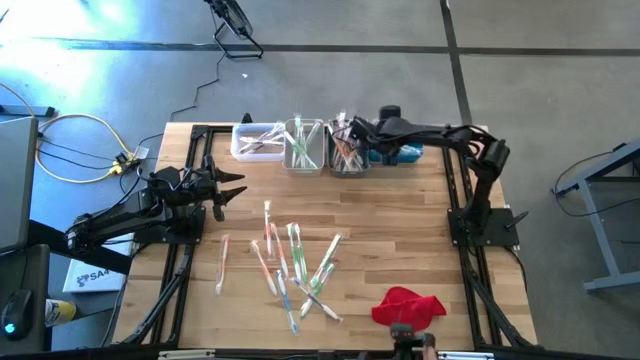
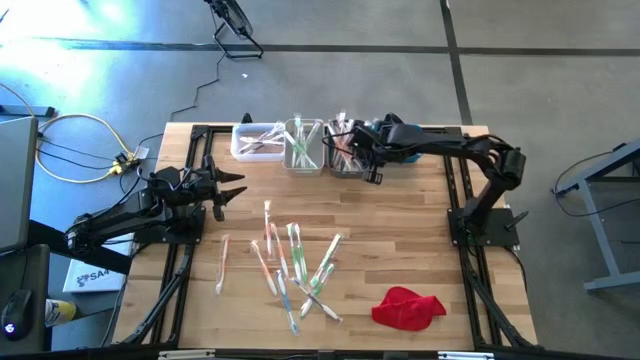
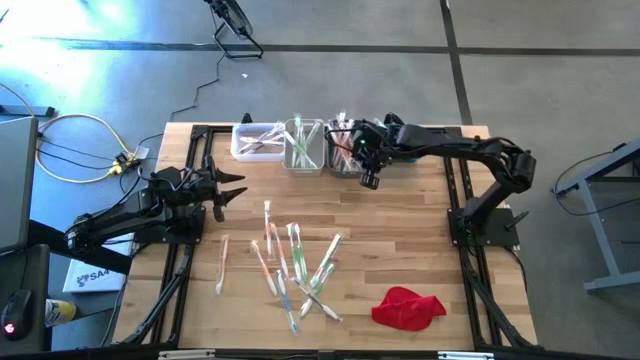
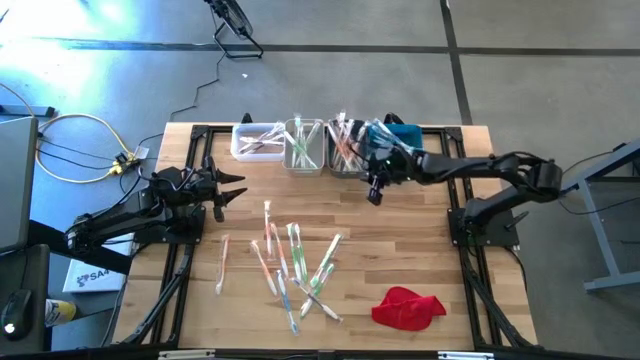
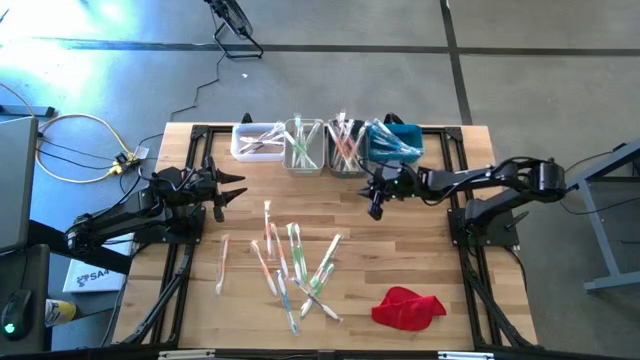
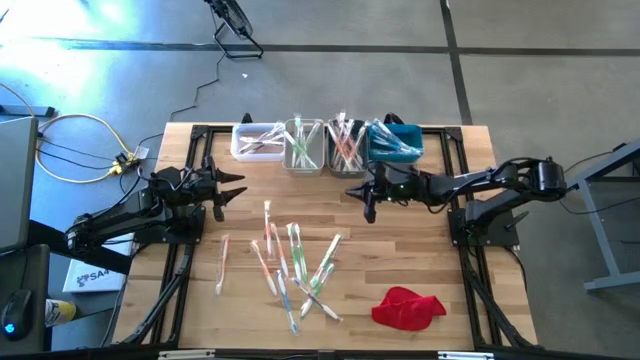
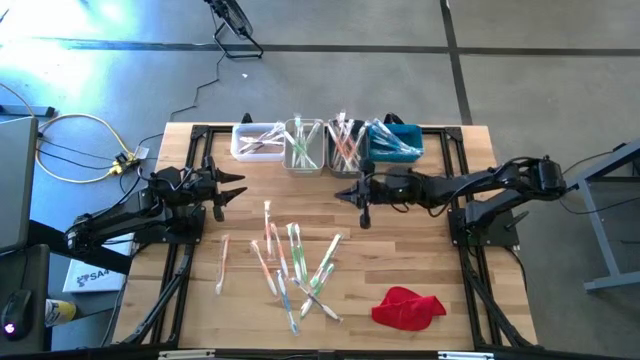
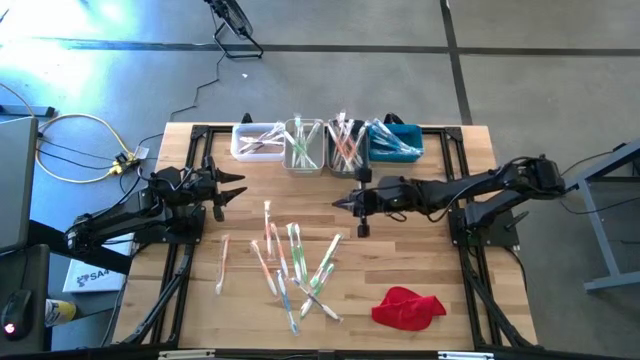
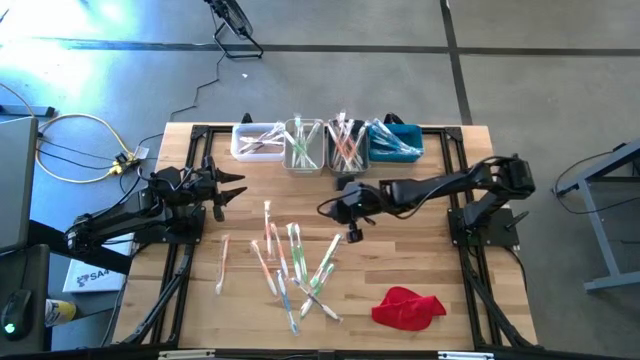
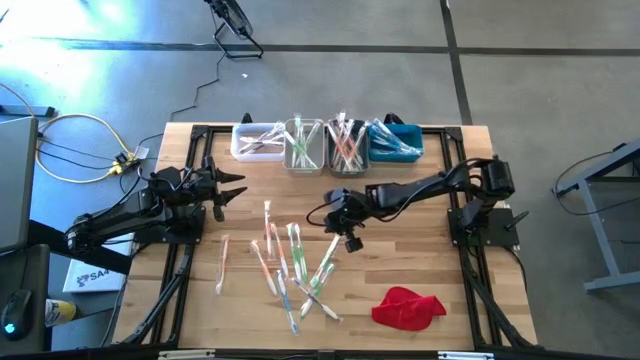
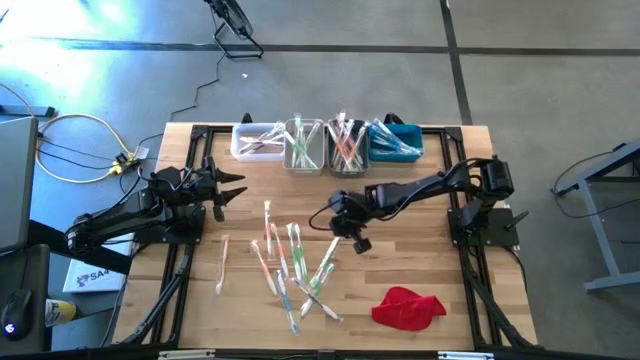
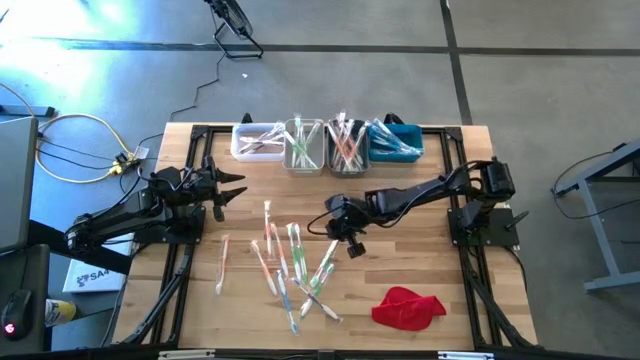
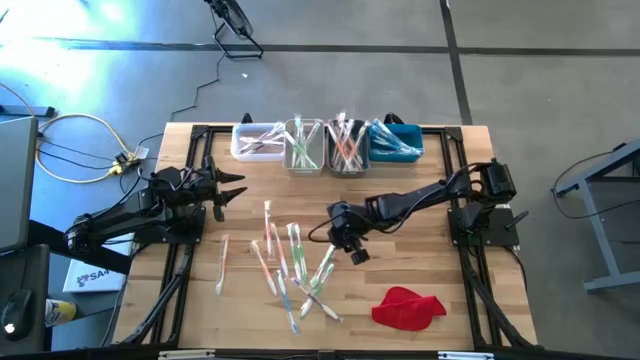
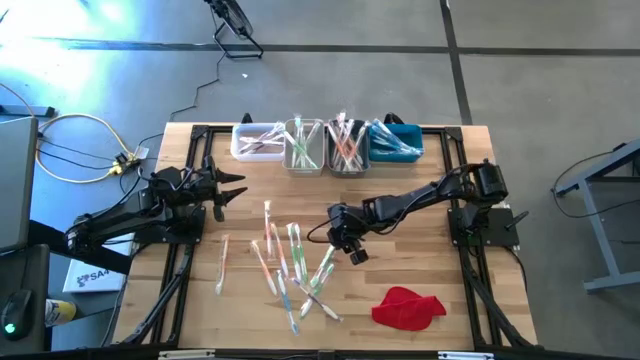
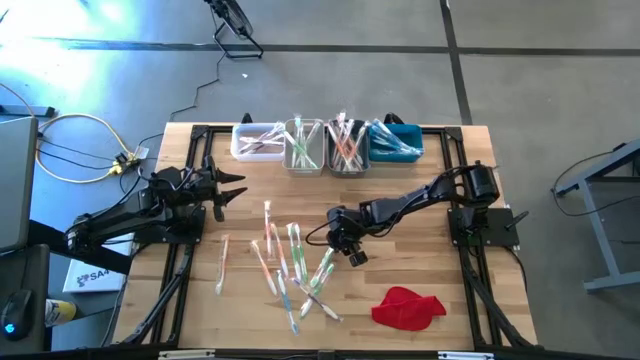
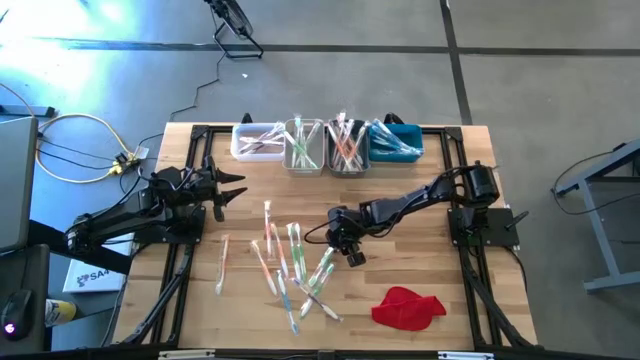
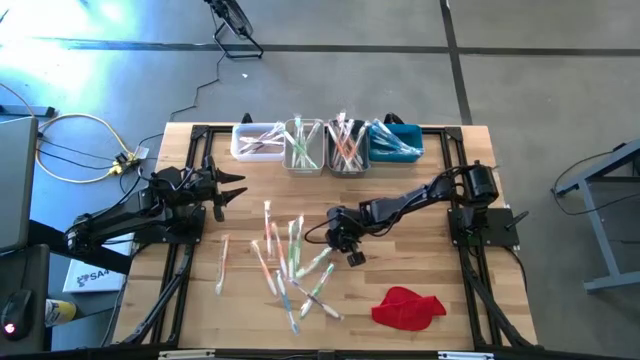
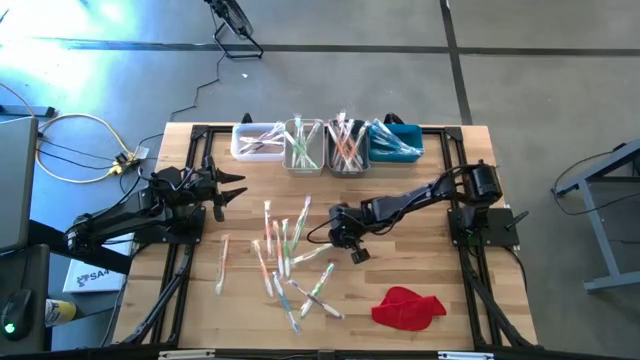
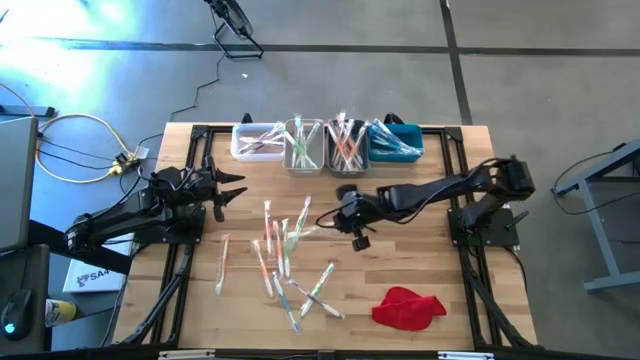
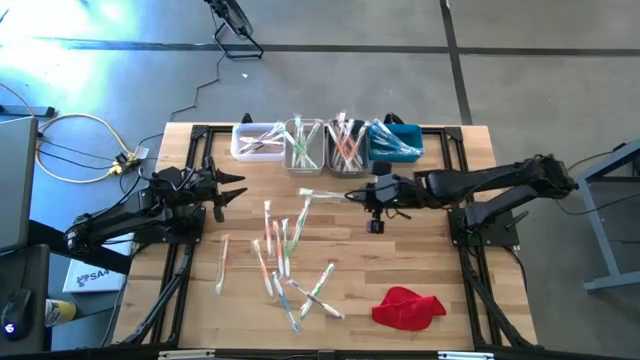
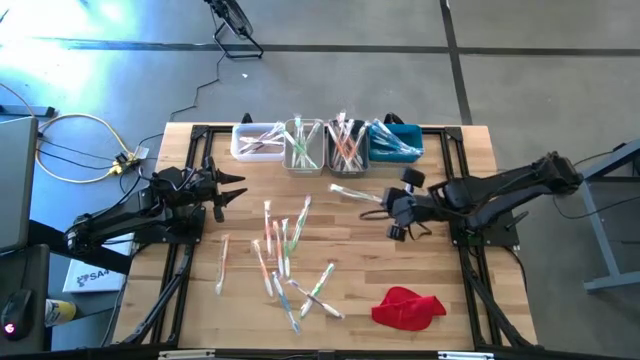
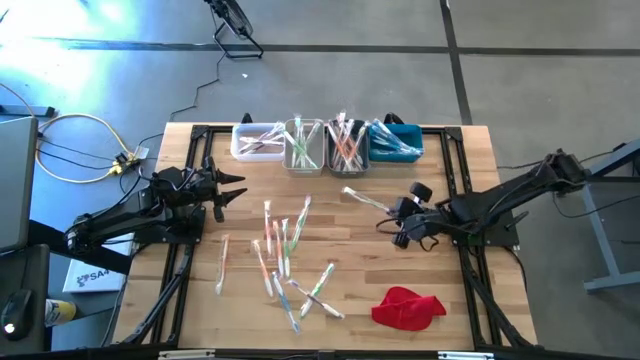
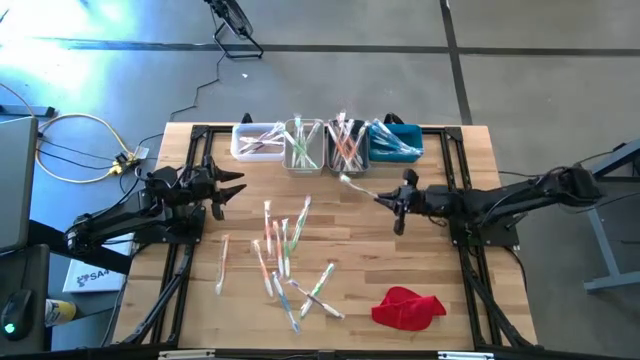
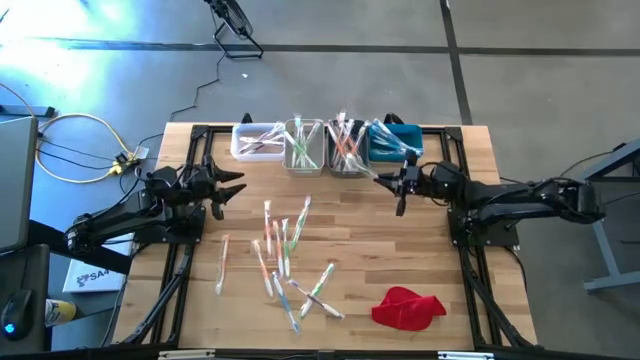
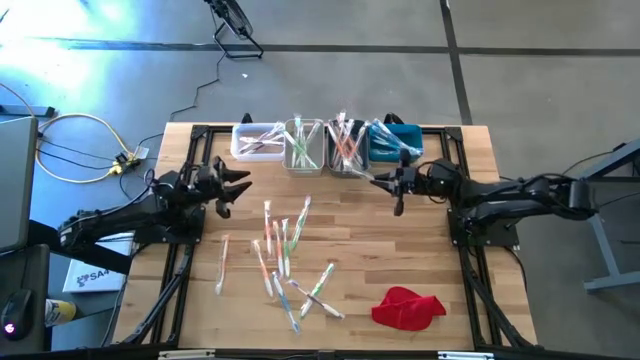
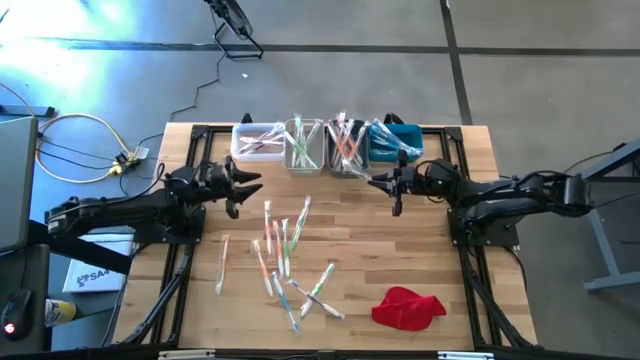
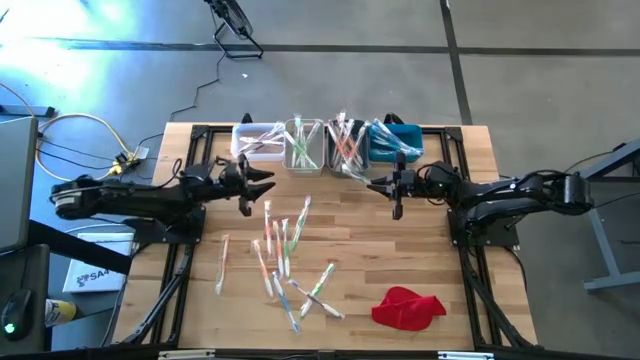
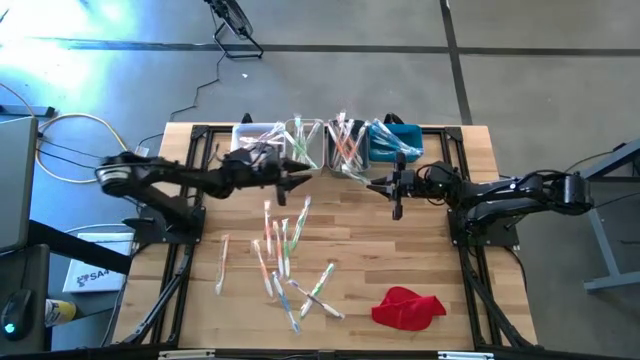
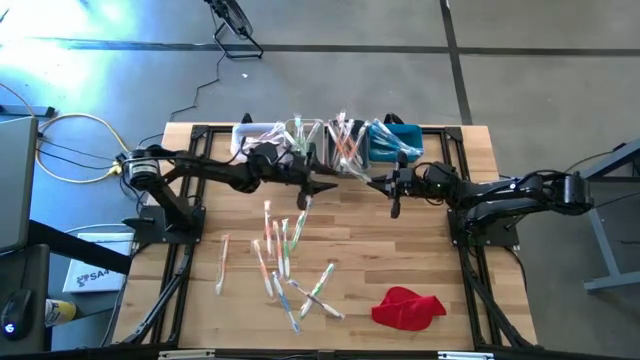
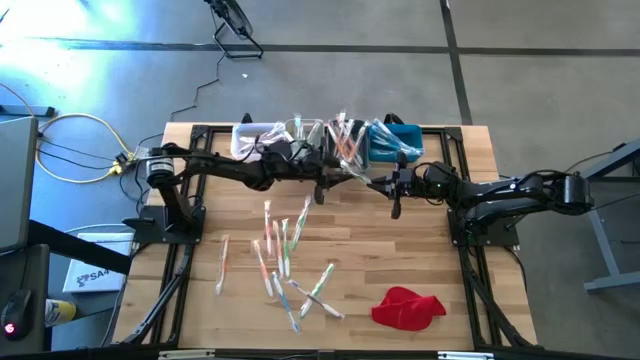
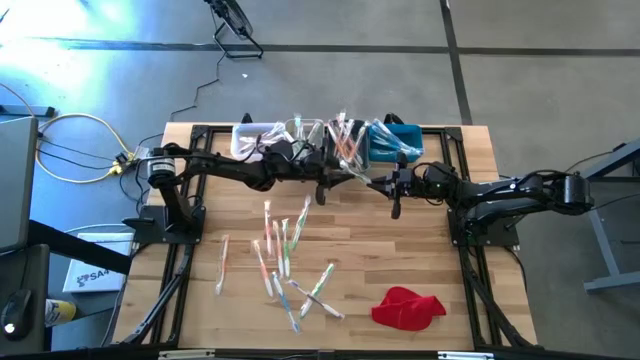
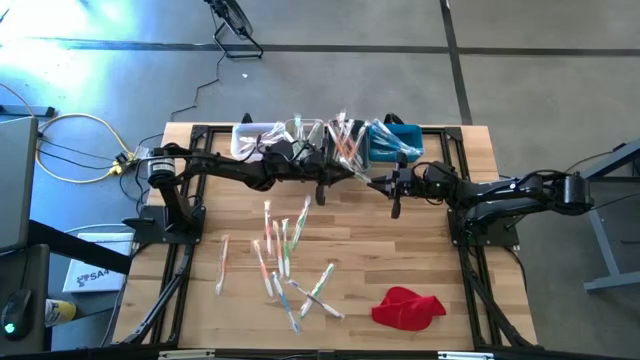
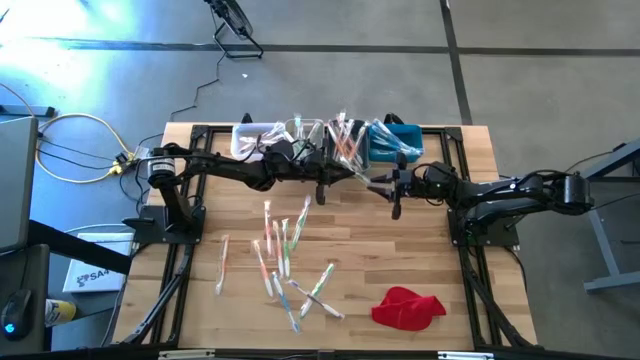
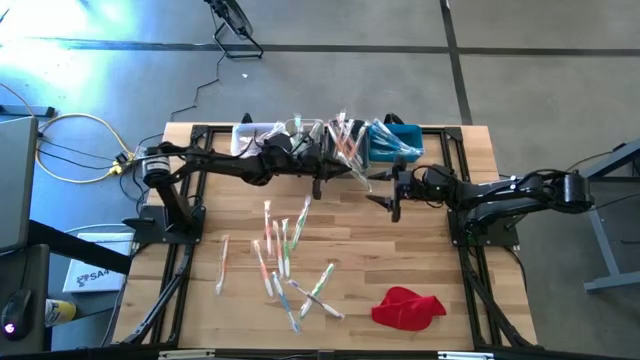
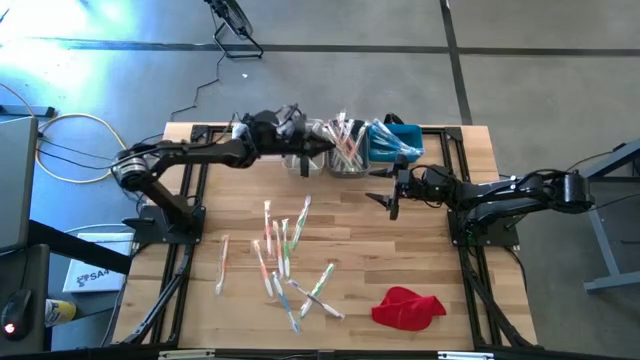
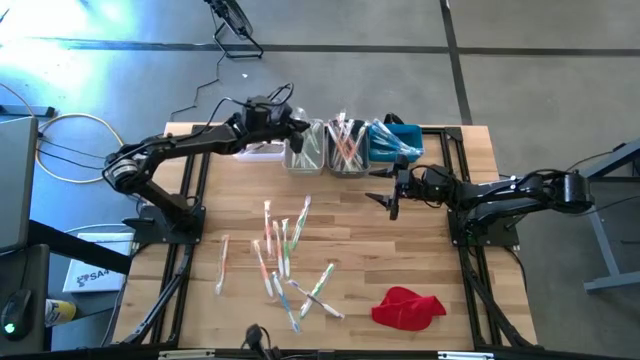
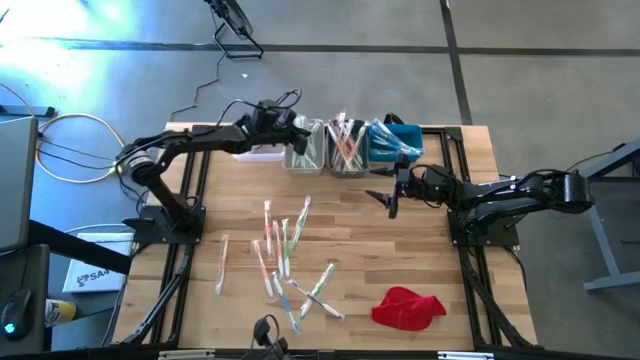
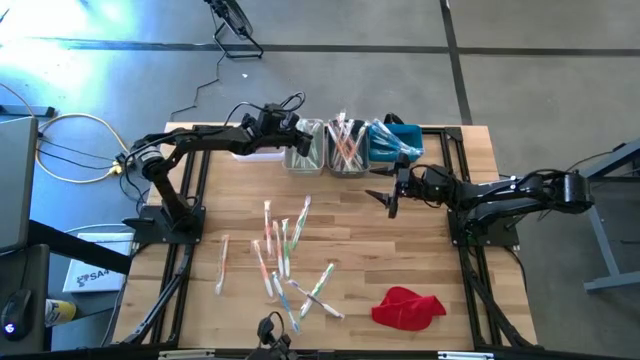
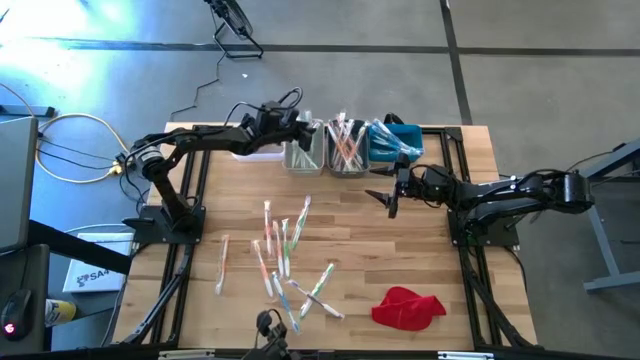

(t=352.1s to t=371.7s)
Task: Pick & Place Toothbrushes
Put the green toothbrush into the gray bin

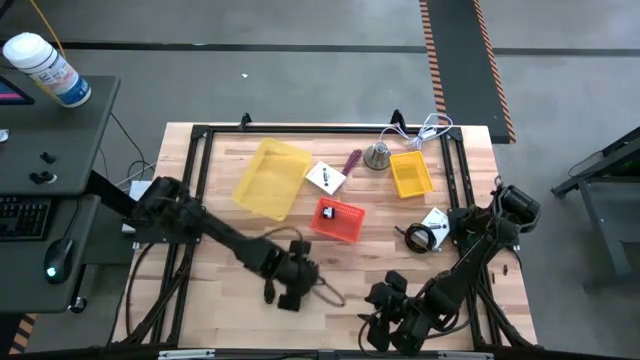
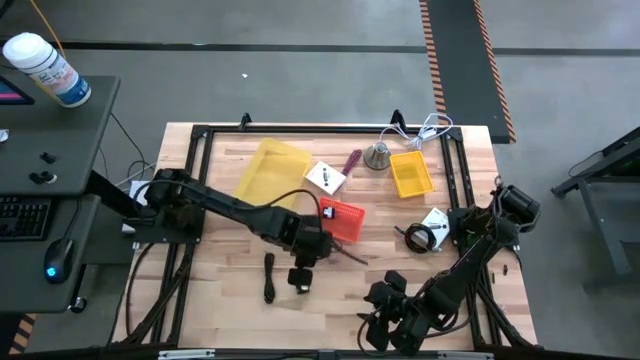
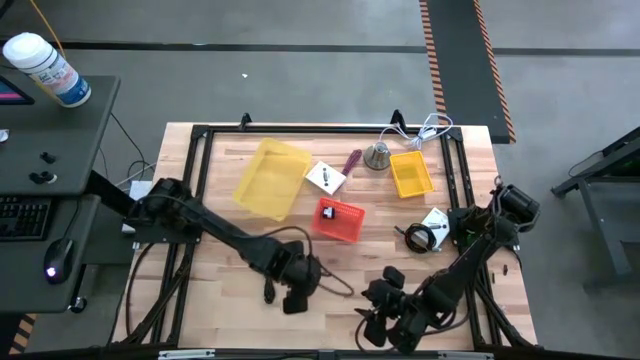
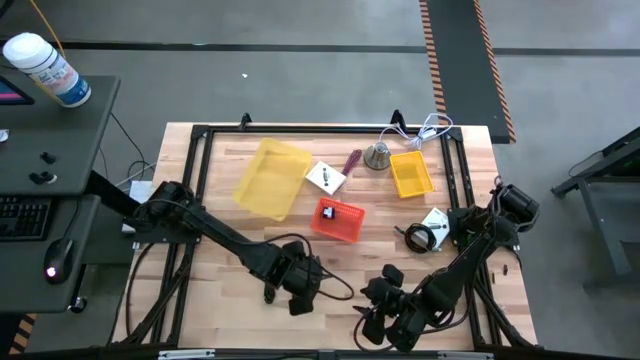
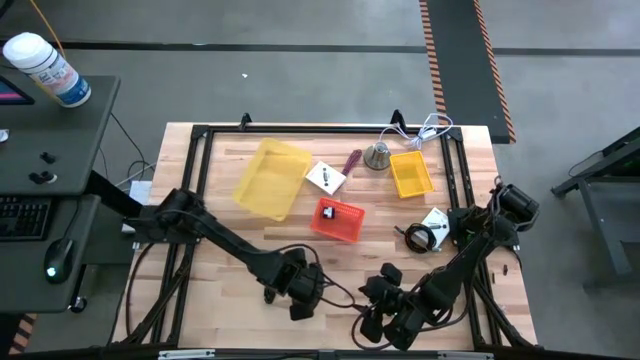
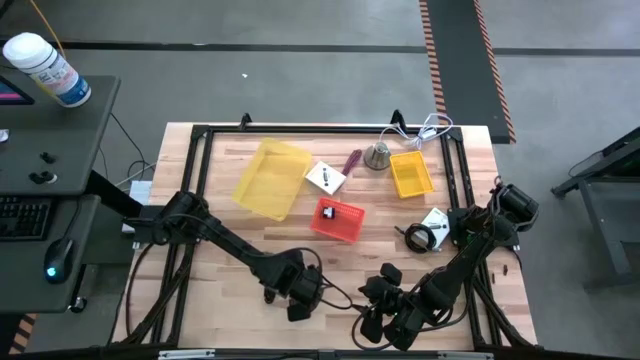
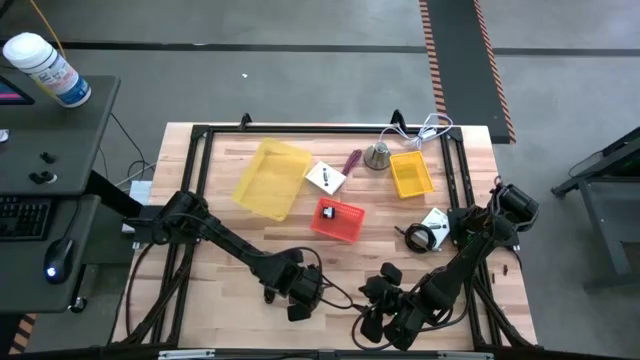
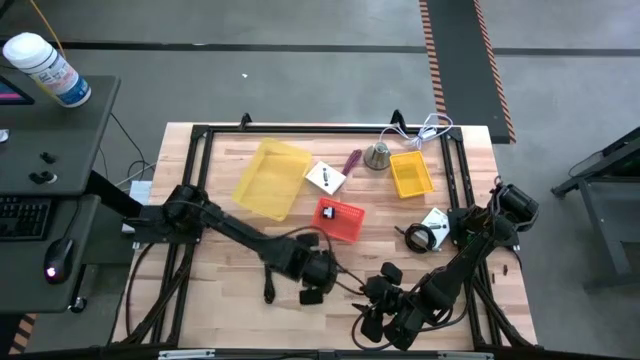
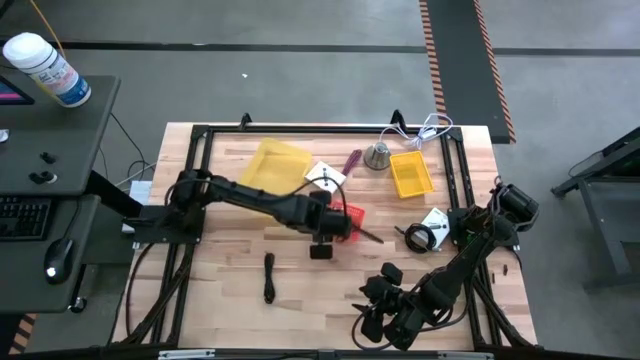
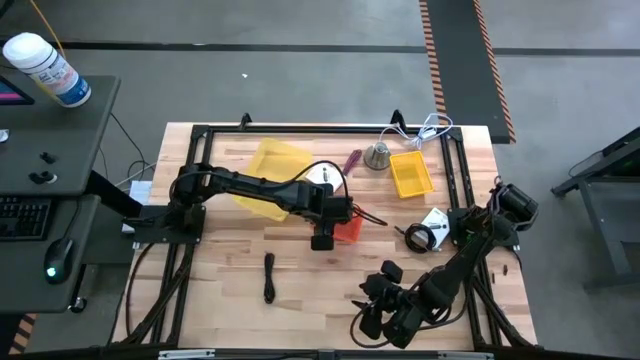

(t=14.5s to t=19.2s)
Task: Pick and place items into bin
Put the black charger adapter into the orange bin
